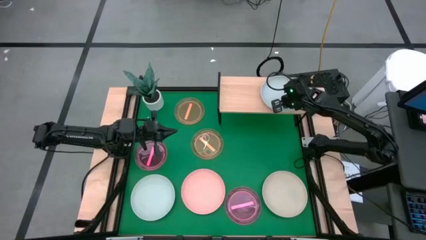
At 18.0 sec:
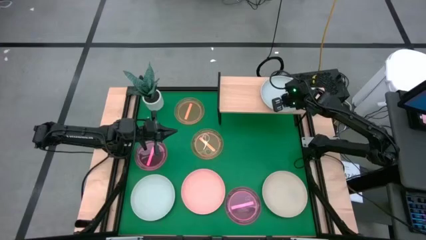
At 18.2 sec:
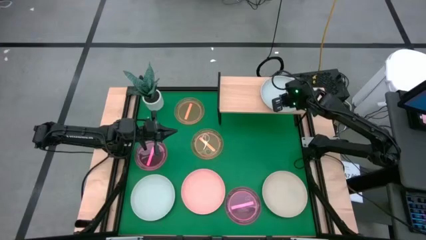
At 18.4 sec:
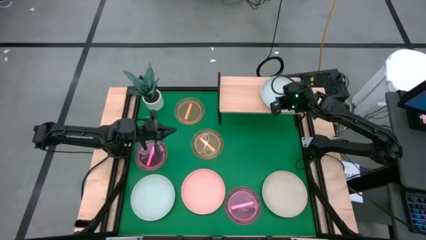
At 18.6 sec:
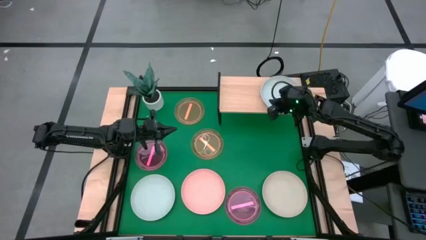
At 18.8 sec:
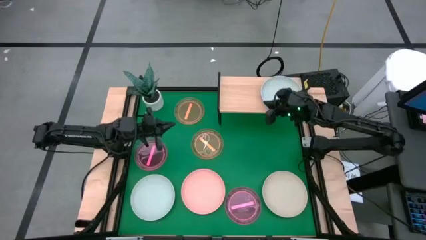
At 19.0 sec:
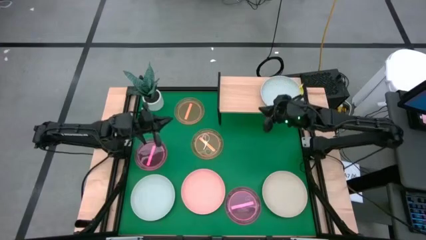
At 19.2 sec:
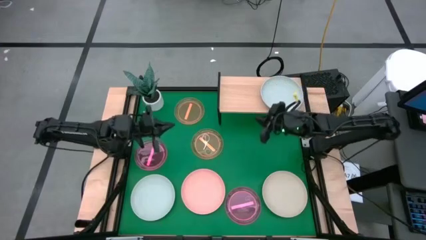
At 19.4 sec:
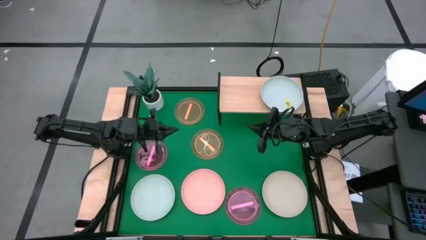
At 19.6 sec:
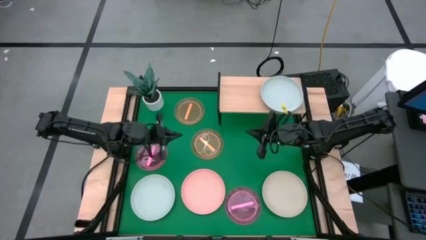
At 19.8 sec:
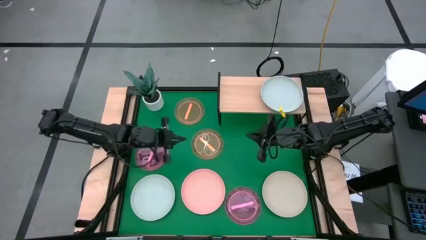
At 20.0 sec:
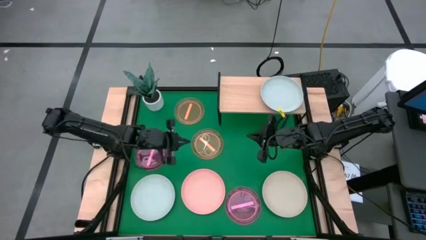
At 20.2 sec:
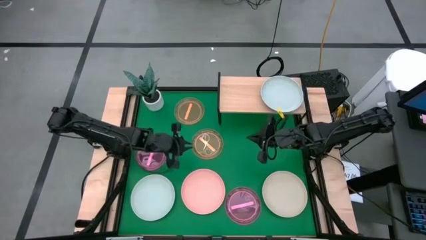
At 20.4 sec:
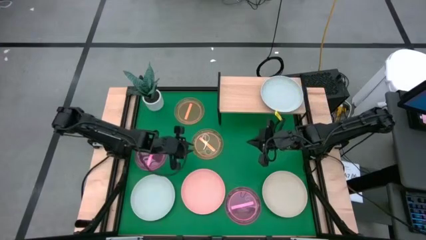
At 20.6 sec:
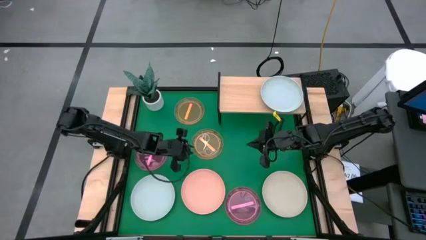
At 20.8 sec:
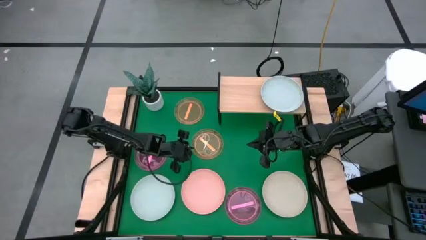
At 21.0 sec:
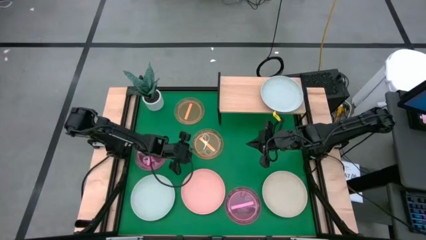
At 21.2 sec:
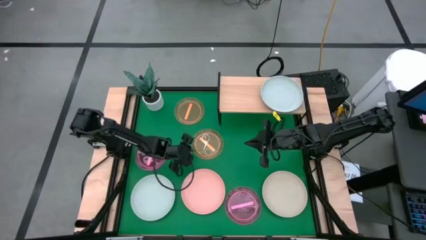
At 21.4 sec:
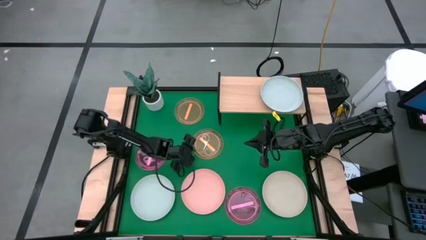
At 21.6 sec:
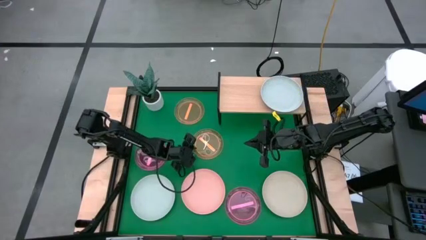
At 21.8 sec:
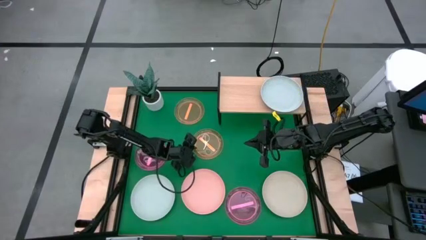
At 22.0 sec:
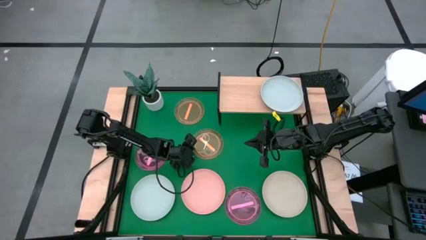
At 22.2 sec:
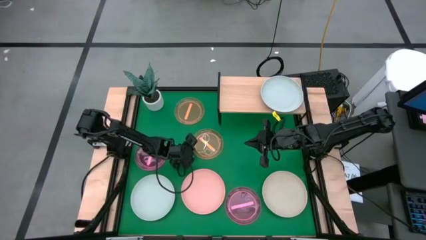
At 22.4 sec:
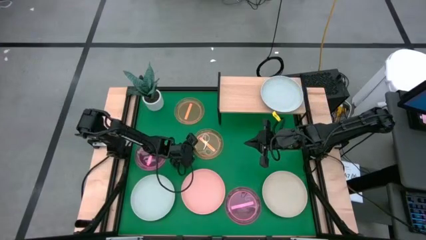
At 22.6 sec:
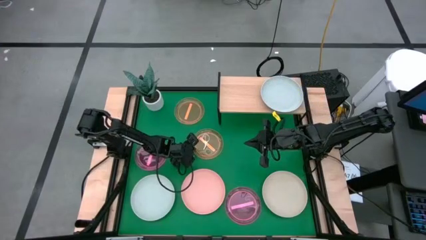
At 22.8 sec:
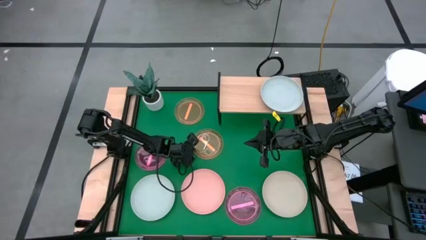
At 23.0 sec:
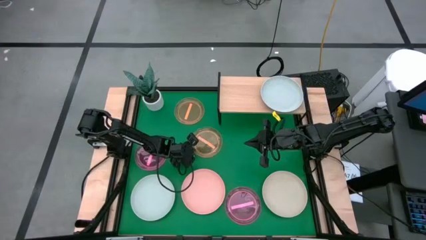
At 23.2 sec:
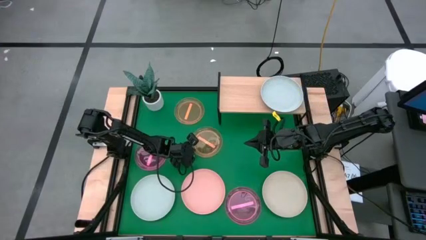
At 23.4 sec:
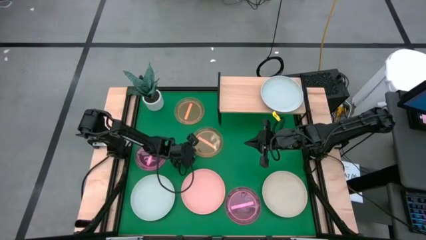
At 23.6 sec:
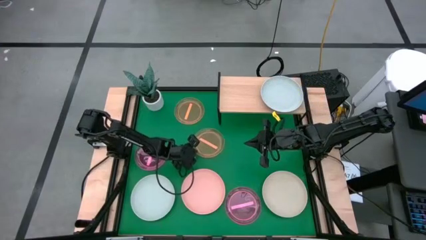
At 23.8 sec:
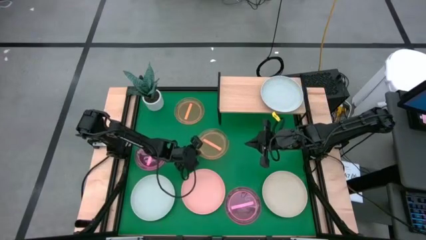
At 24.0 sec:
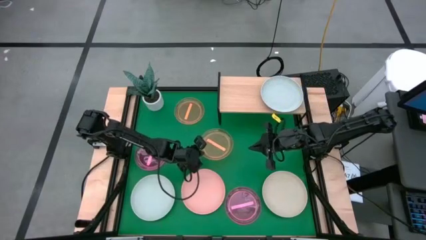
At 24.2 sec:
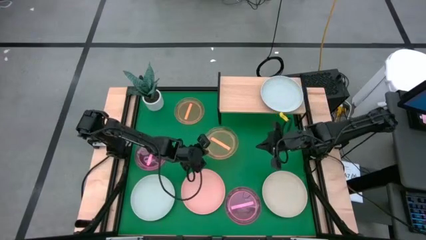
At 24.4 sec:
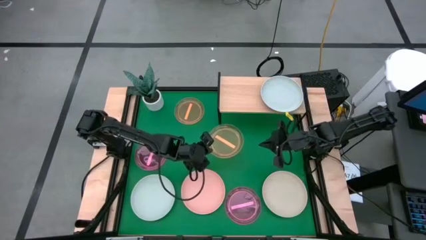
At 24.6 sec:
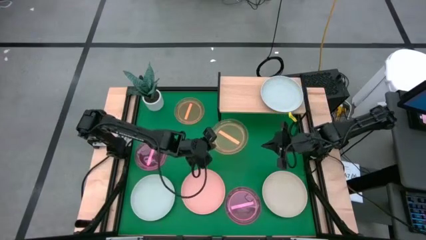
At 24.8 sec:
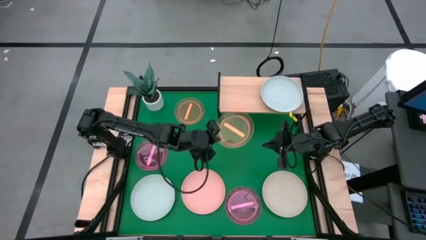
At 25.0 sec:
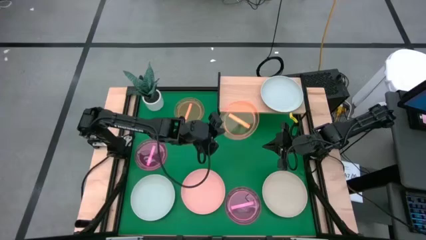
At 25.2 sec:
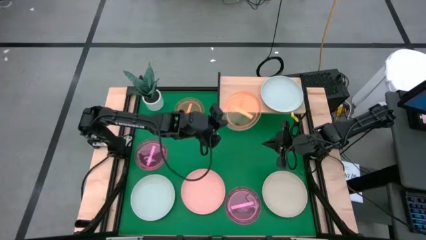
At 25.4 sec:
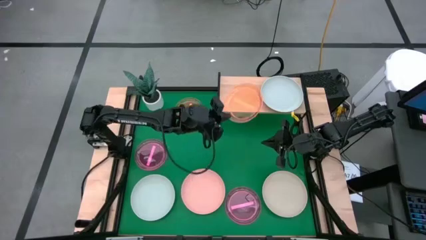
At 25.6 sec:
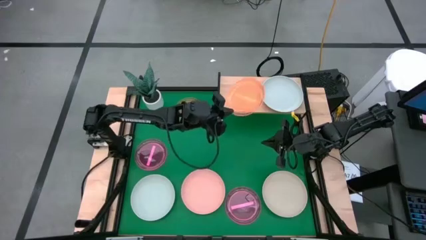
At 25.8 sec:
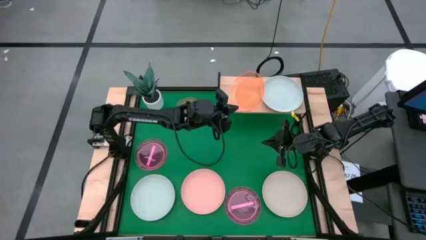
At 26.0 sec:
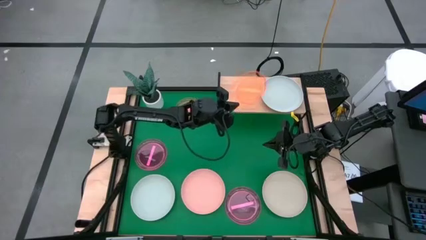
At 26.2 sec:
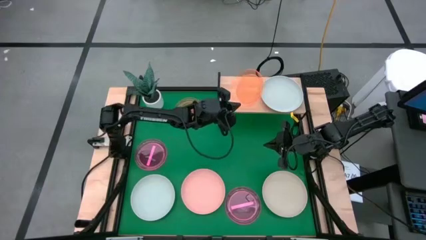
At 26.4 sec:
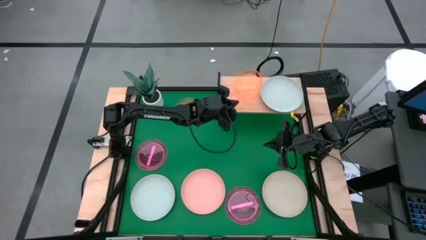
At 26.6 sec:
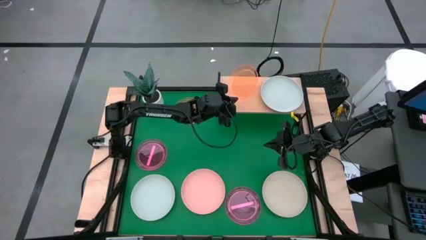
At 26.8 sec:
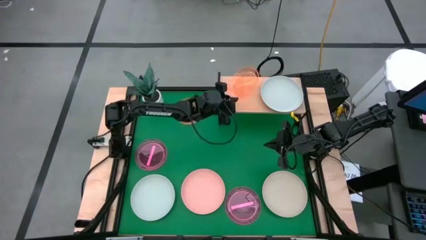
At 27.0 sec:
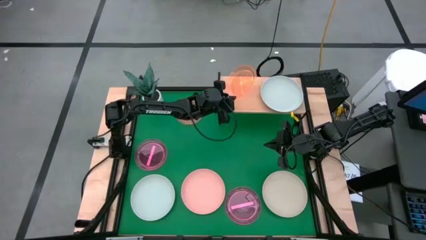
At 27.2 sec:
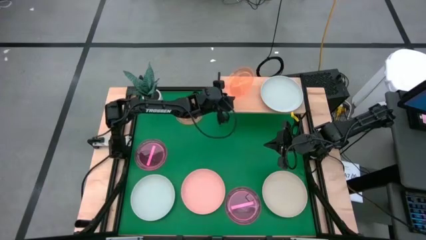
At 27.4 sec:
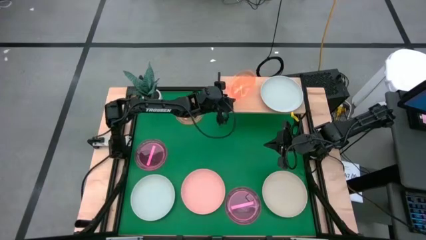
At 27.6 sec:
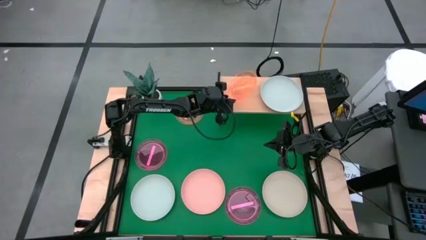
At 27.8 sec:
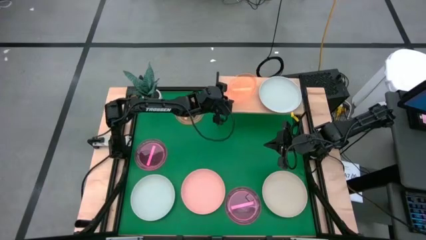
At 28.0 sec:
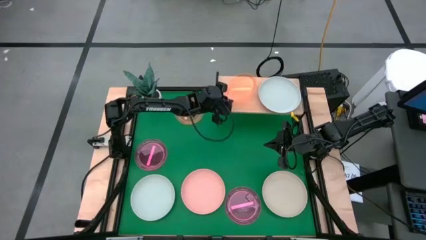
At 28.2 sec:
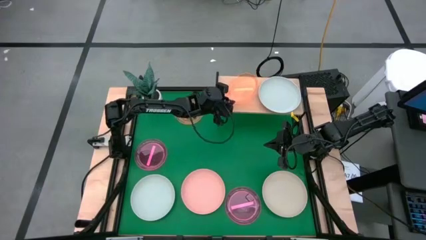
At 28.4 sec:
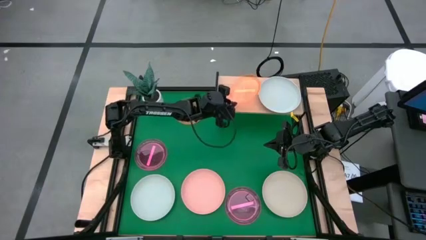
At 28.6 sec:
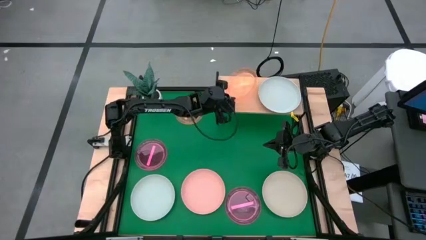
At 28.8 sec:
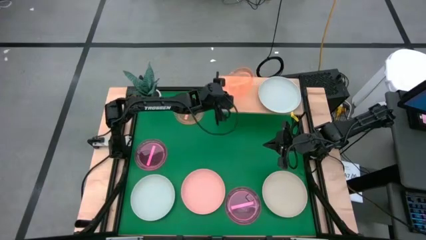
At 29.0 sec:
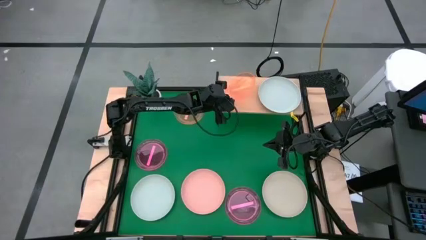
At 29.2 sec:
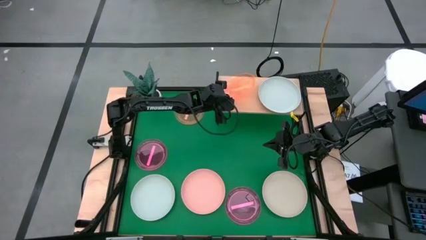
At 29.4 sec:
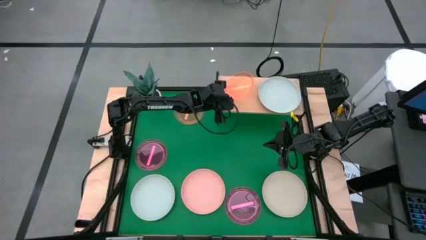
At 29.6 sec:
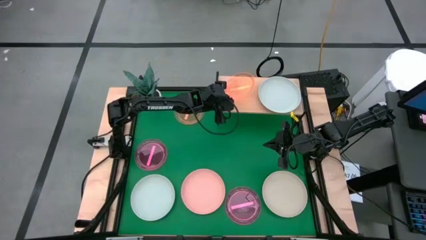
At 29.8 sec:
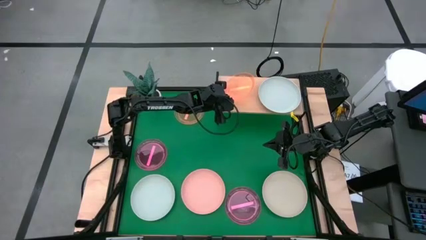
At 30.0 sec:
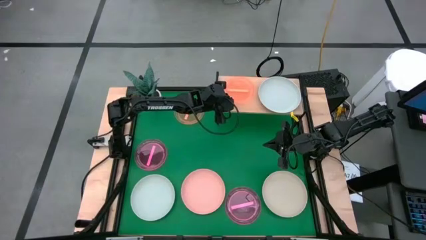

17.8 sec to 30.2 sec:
Task: Place and stack plates onto a shelf
Put the bottom small orange plate on the shelf

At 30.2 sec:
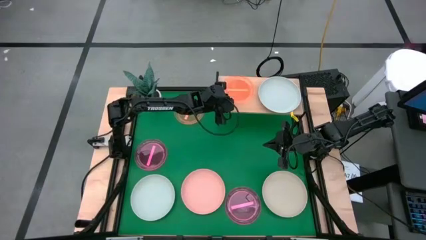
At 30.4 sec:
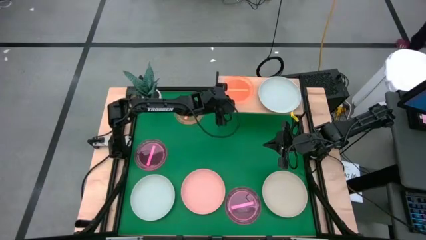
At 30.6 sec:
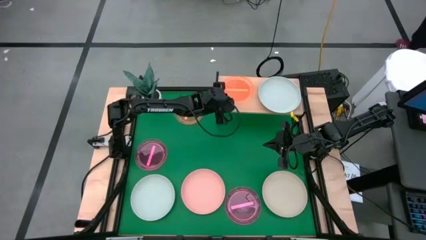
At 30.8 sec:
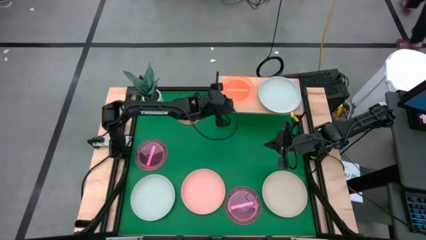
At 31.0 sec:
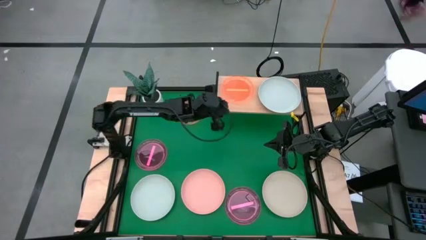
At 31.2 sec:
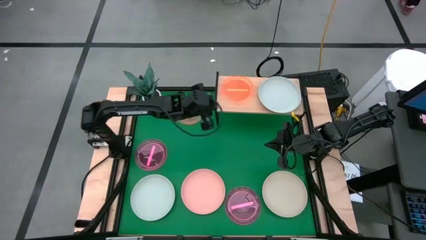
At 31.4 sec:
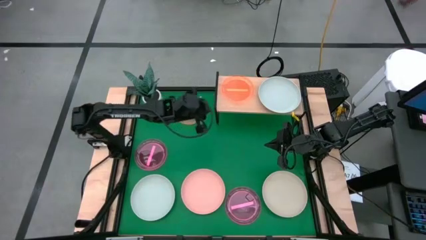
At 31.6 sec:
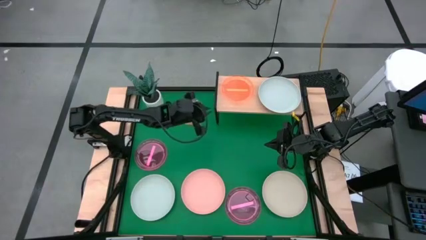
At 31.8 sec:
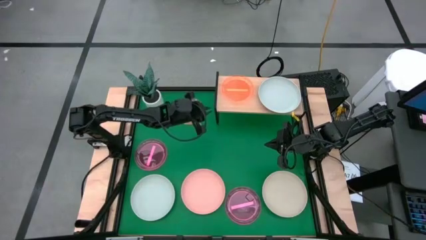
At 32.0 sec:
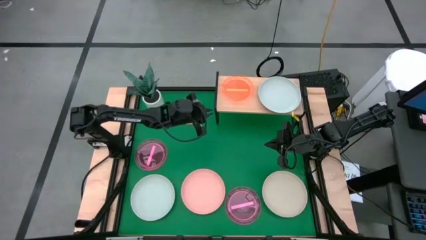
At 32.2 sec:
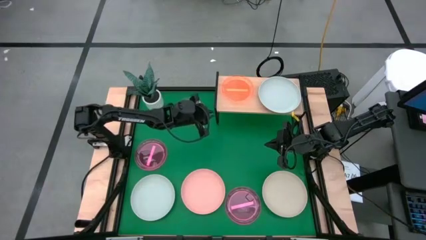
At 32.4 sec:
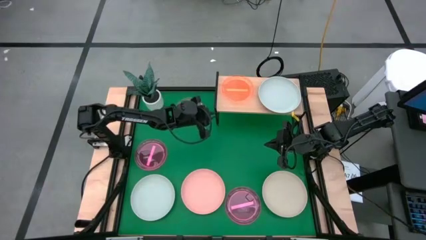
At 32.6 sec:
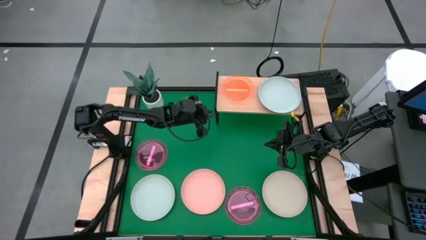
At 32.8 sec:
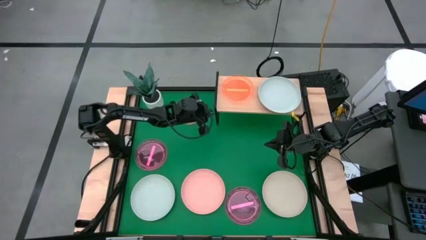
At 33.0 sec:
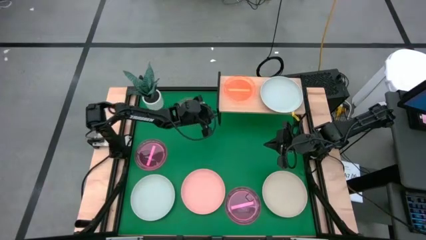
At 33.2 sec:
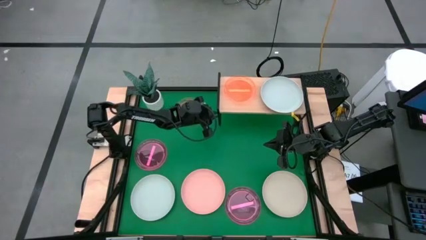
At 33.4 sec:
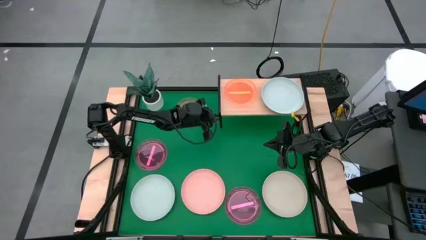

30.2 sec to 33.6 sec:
Adjust the shelf

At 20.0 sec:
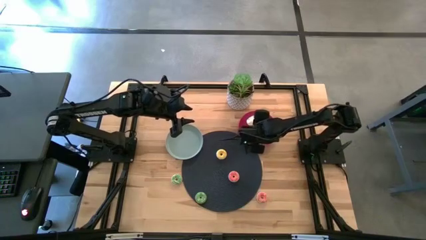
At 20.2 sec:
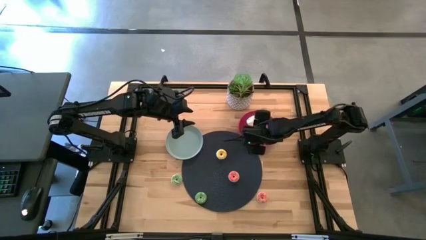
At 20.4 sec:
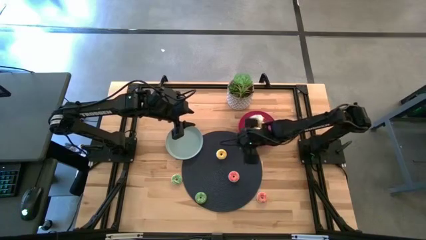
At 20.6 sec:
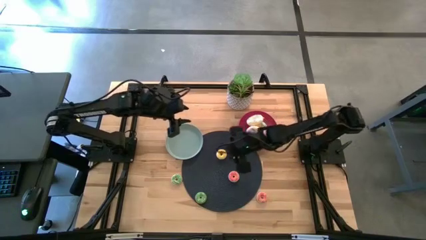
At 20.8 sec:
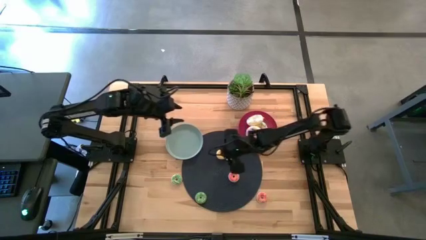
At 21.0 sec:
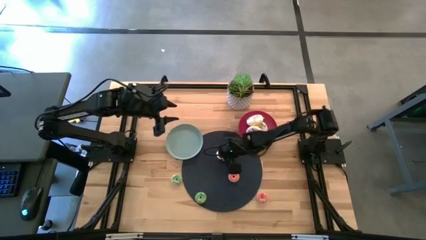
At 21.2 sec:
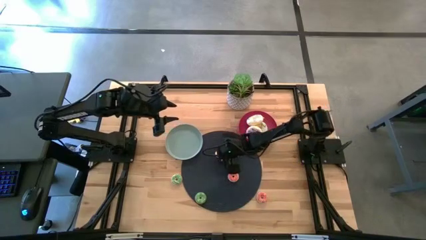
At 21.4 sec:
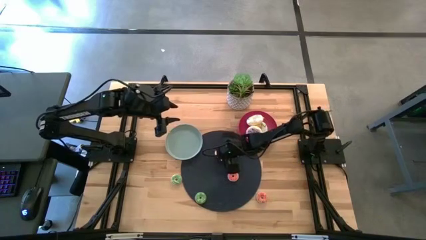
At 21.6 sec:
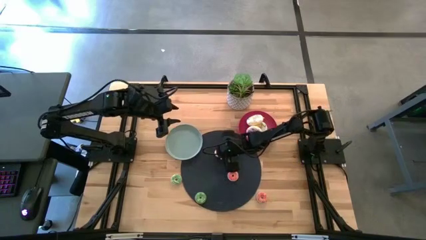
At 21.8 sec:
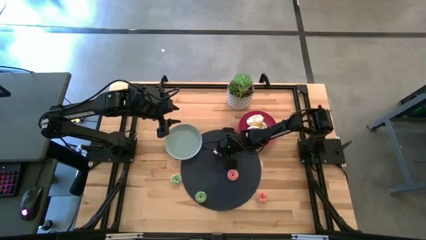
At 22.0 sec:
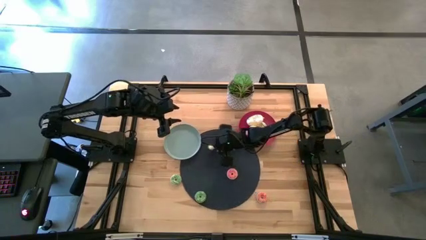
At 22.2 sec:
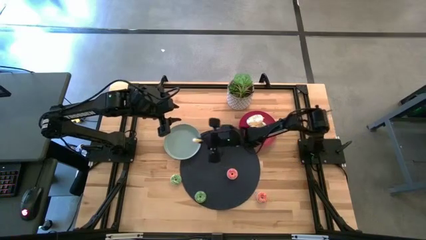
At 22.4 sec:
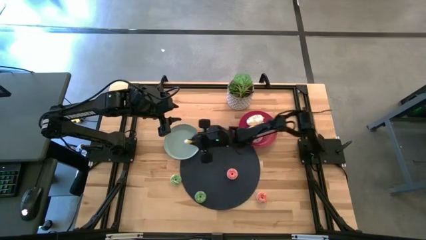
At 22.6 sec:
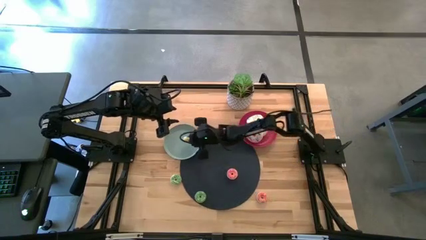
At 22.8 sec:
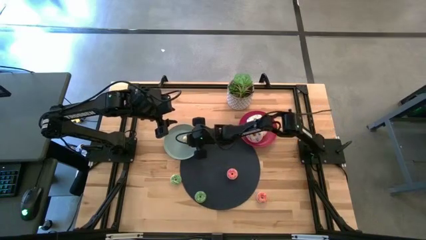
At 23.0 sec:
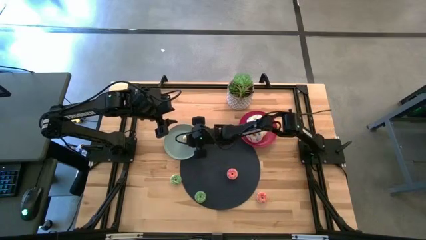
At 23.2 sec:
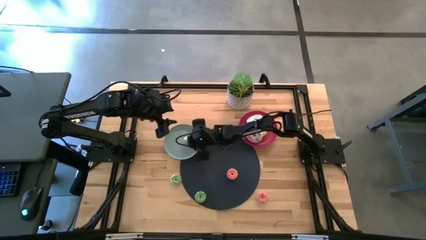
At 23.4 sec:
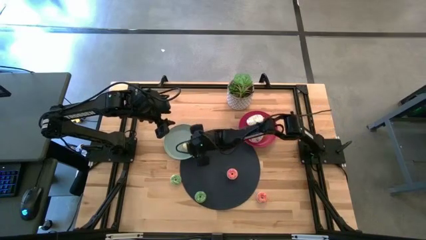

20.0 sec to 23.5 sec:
Task: Pick & Place donuts
Put the small yellow doughnut on the blue plate
